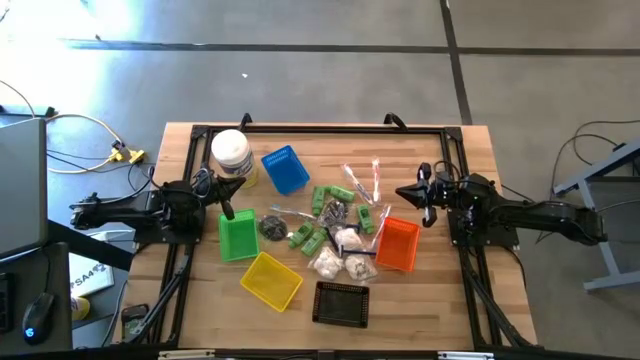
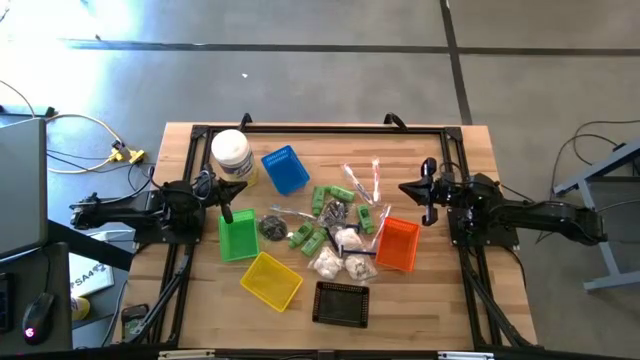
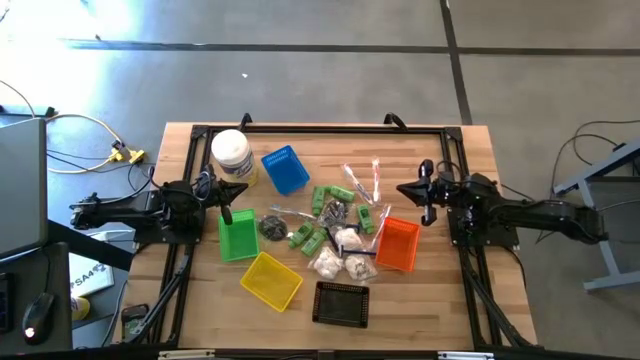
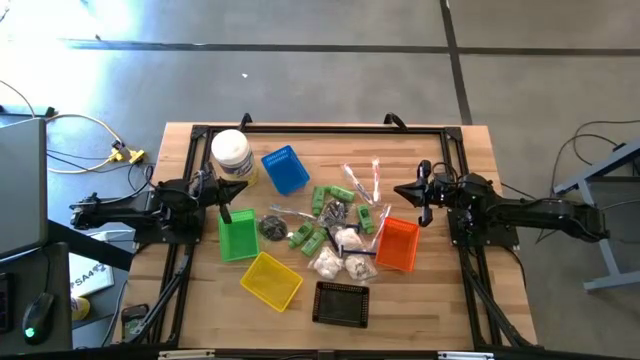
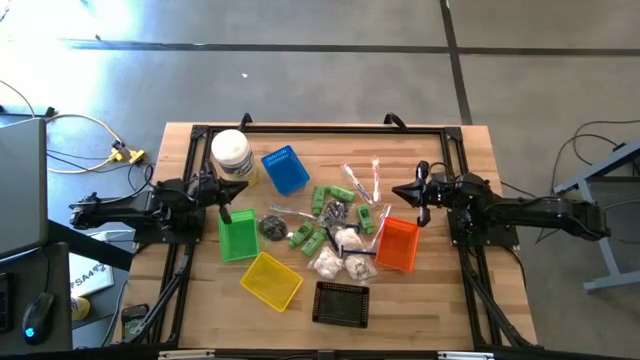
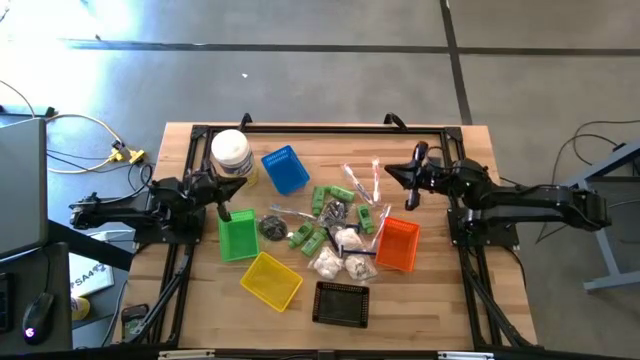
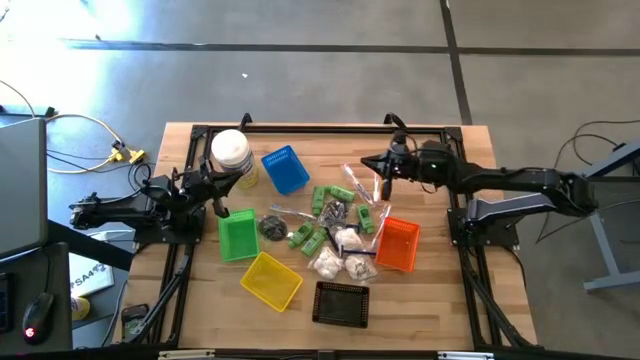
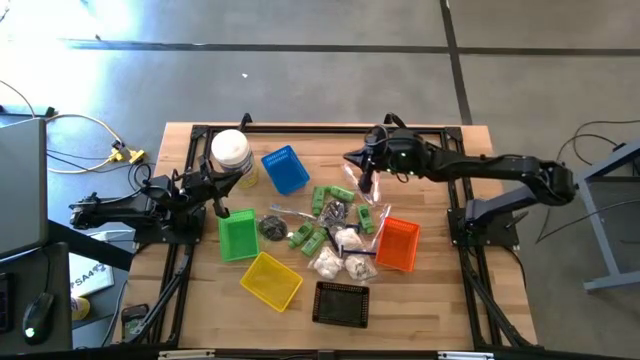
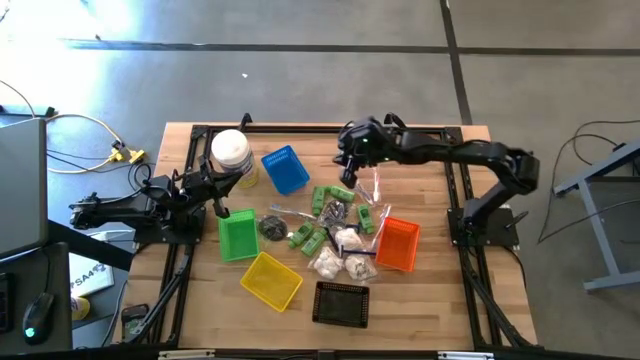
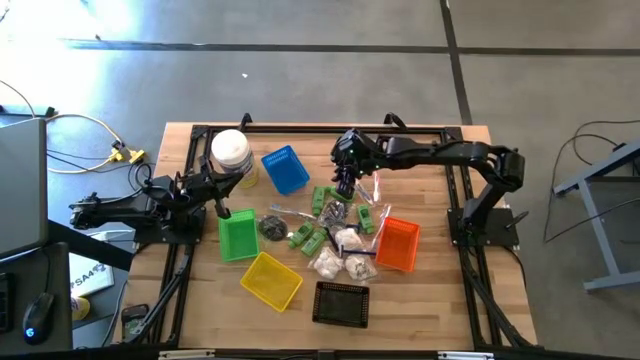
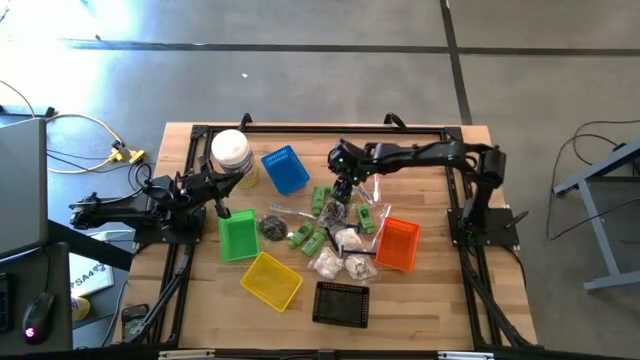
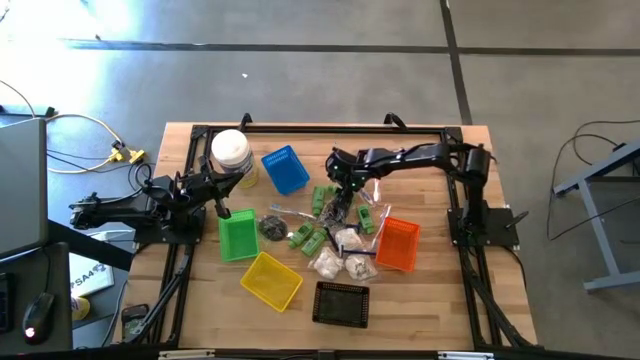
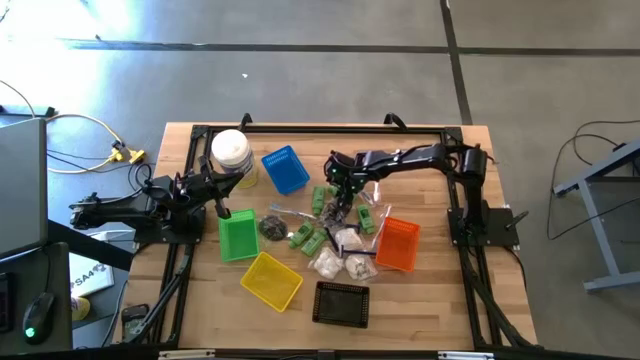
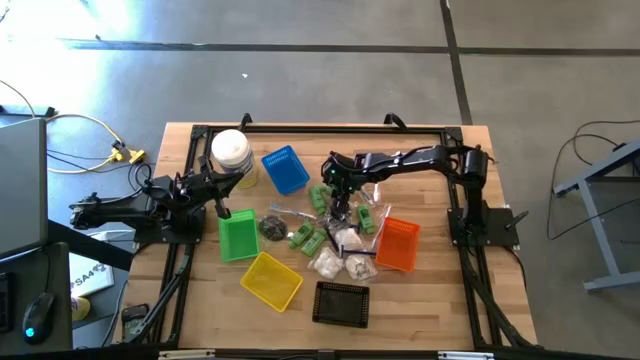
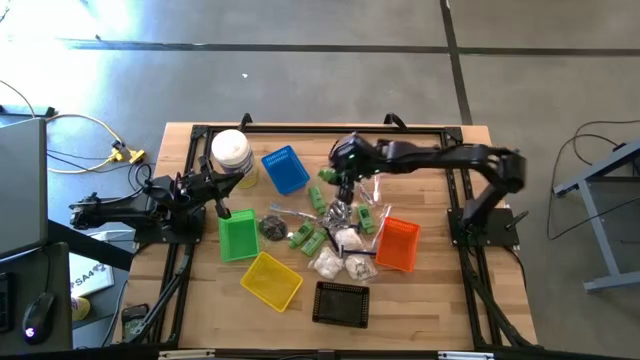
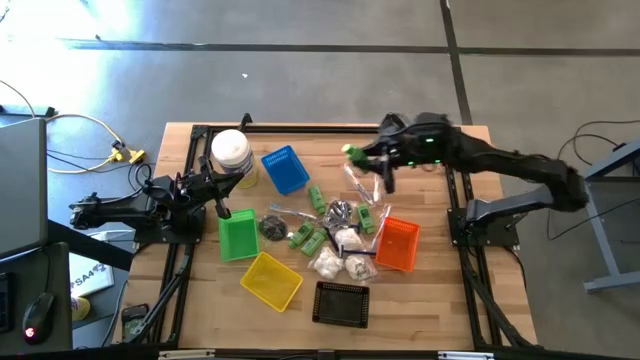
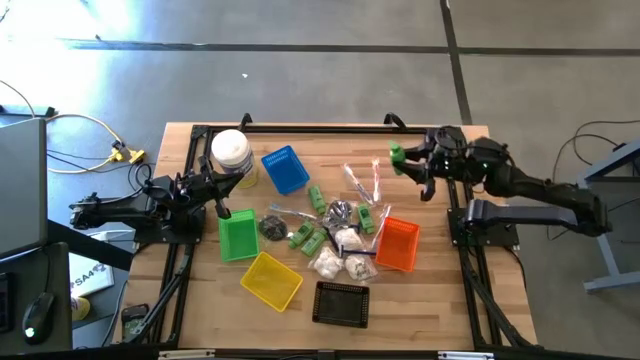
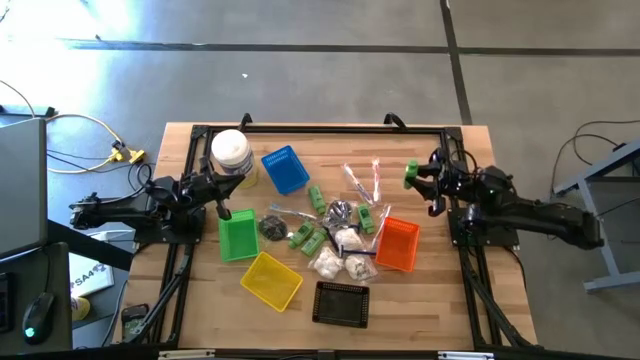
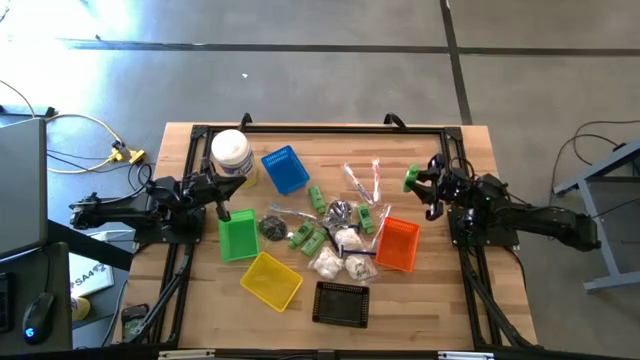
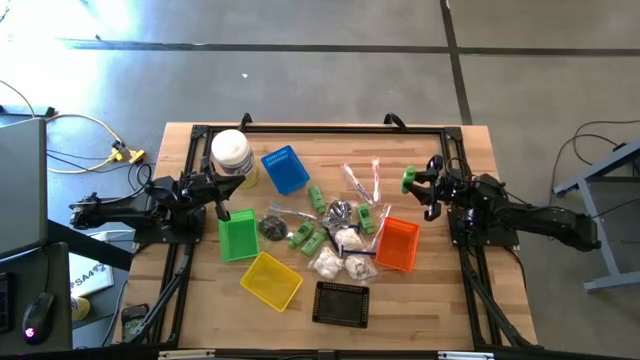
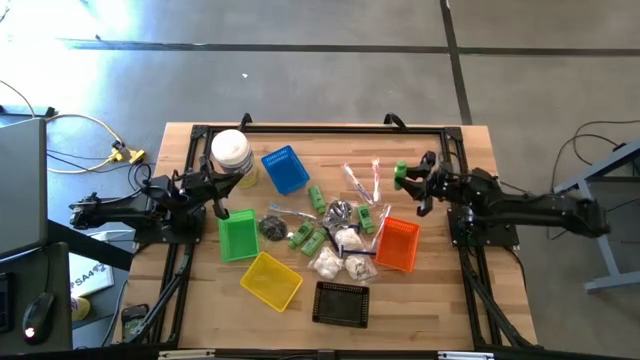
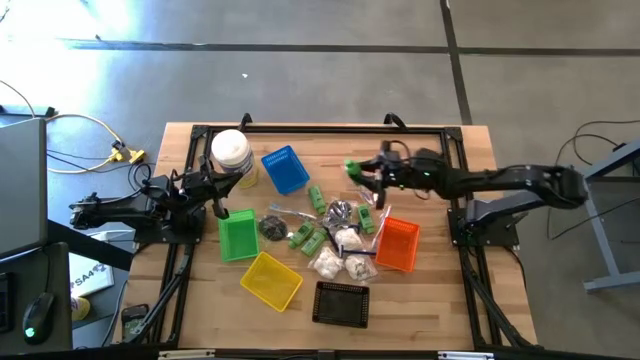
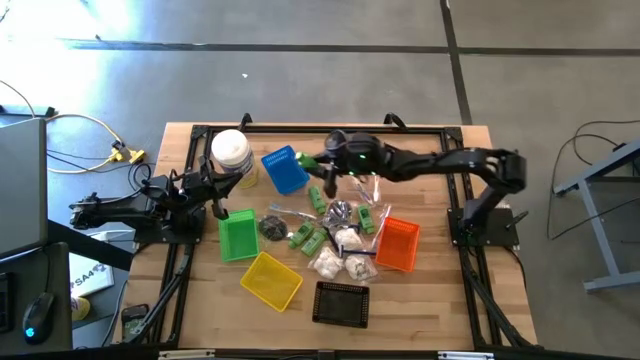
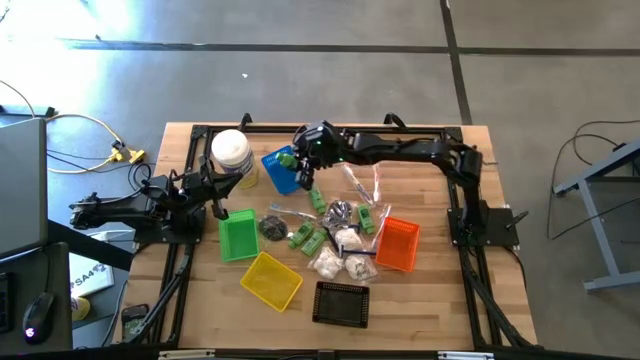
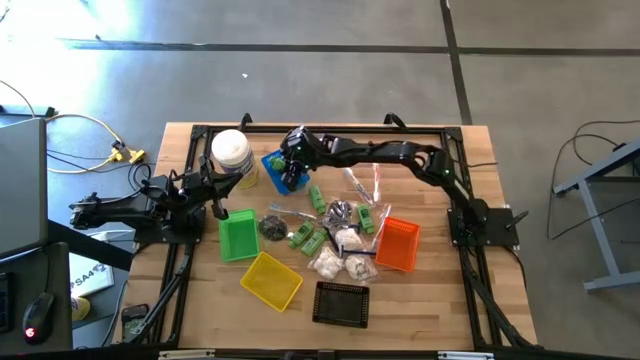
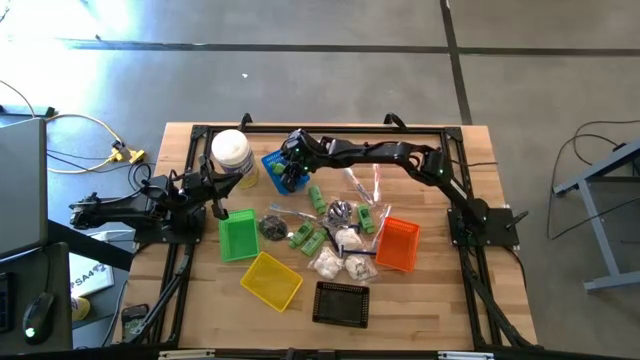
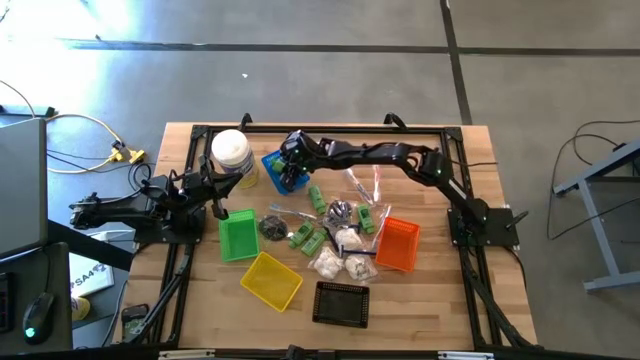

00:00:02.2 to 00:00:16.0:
Task: Pick & Place Travel size toiletries
Put the green shampoo into the blue bin

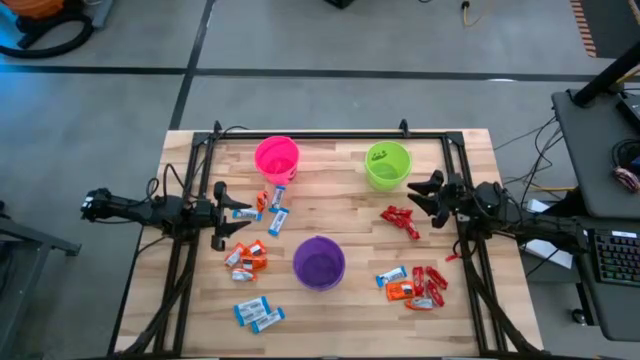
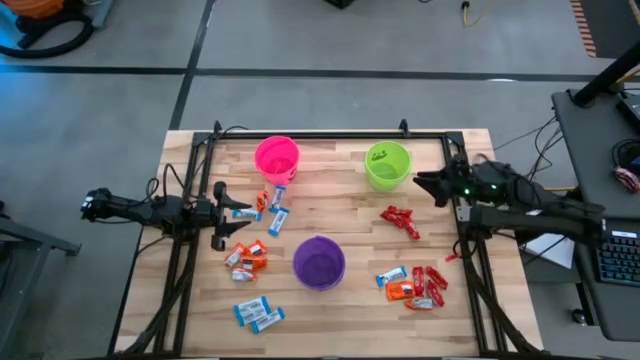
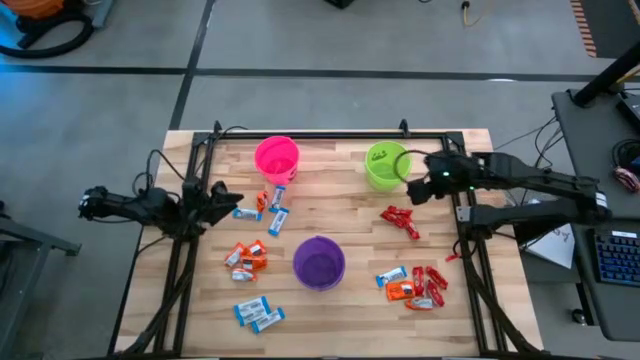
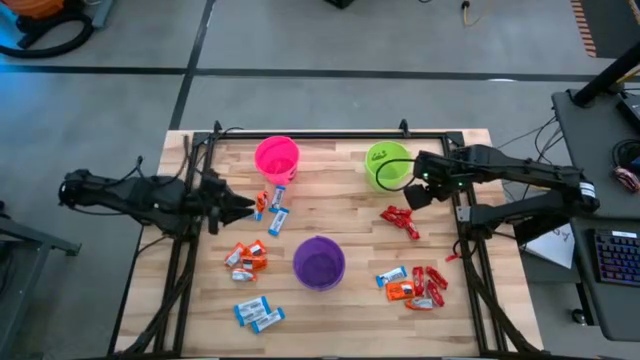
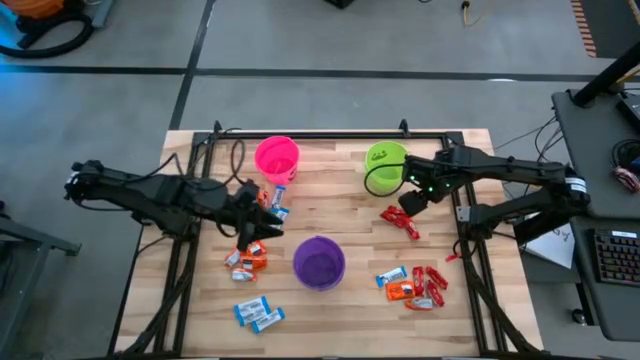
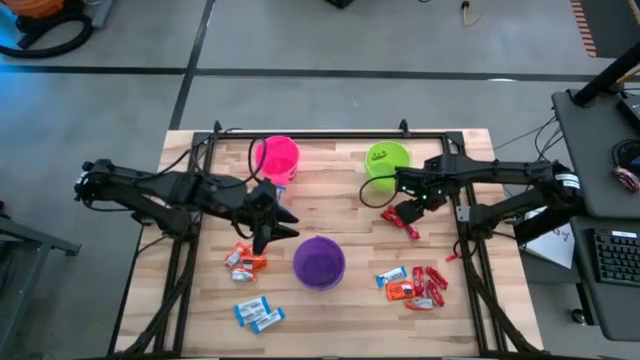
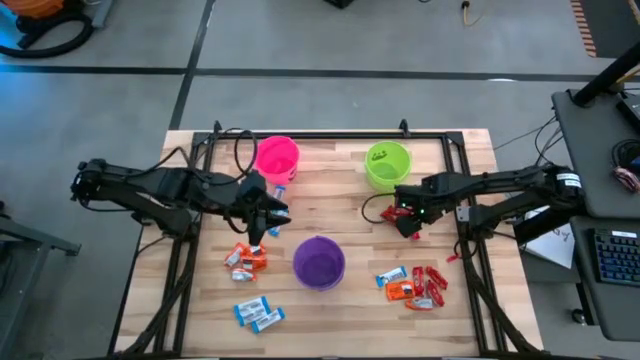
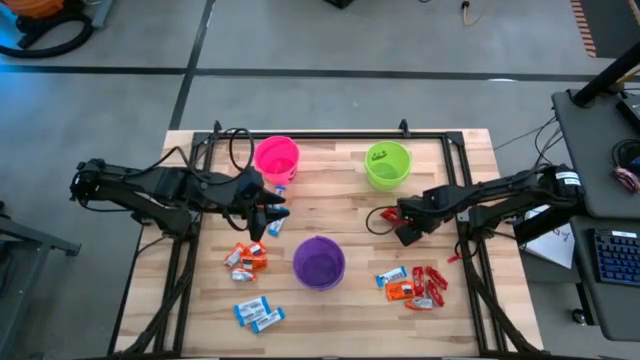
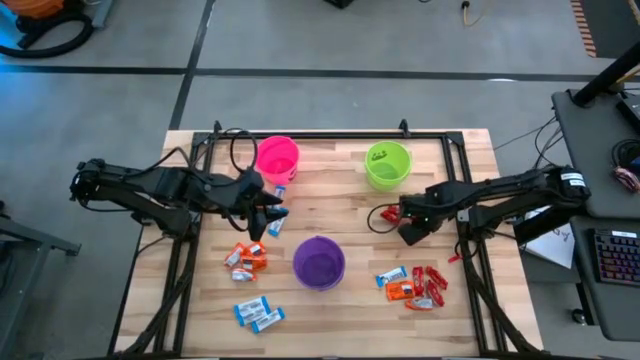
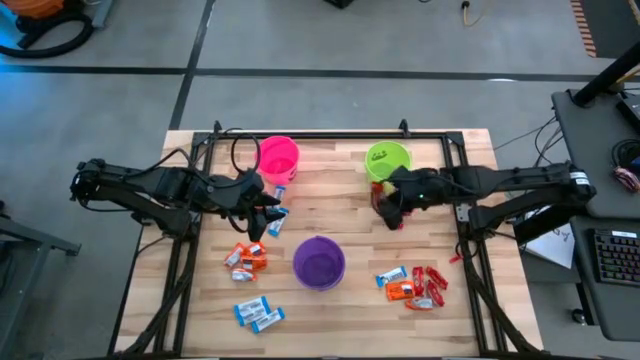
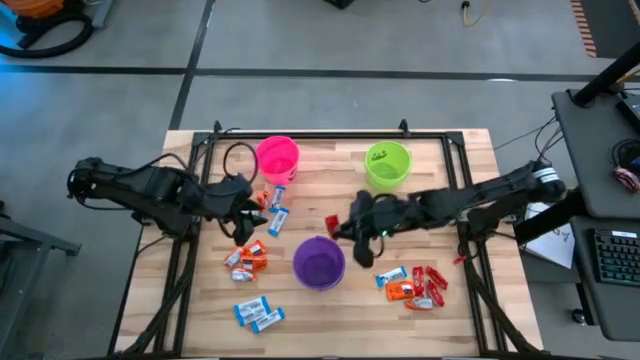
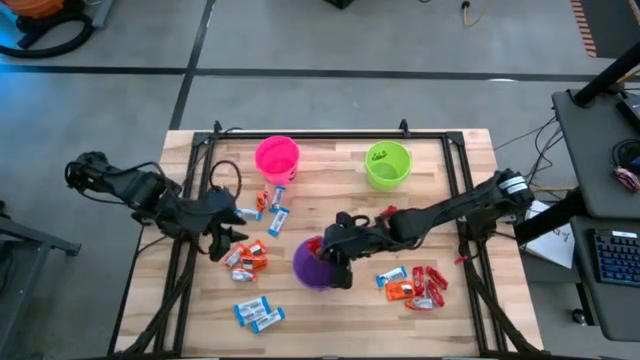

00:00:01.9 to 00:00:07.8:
Task: Sort candy
Put the red chocolate into the violet bucket

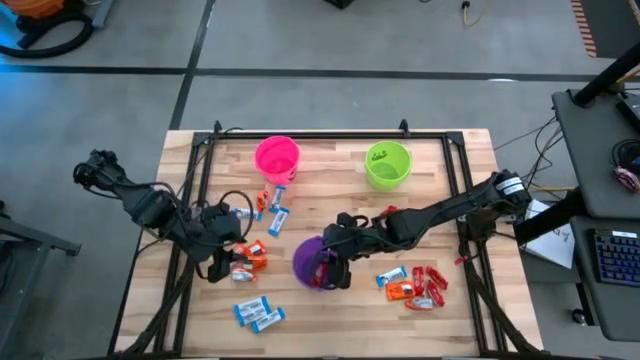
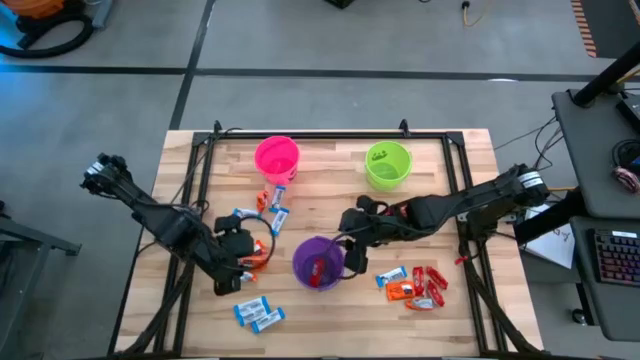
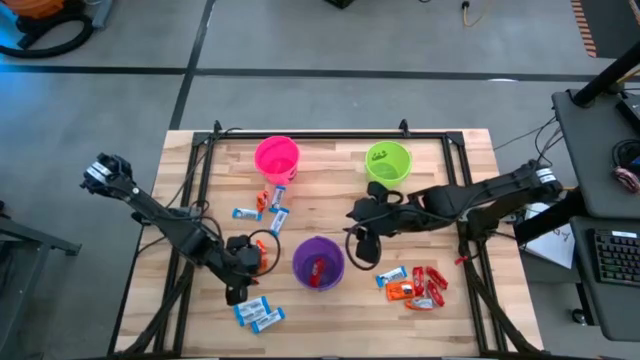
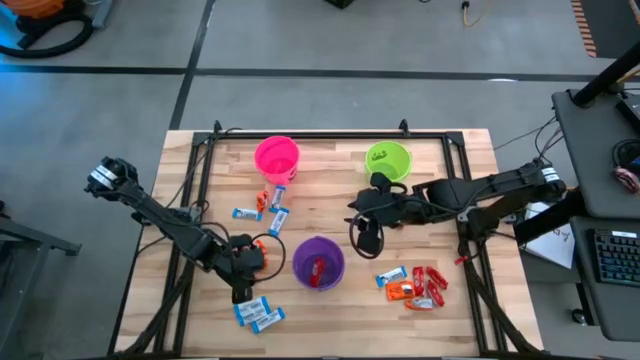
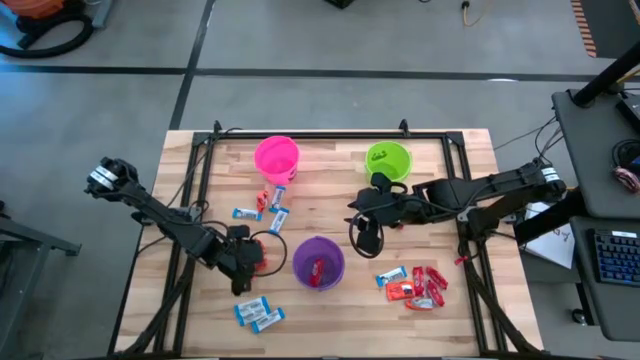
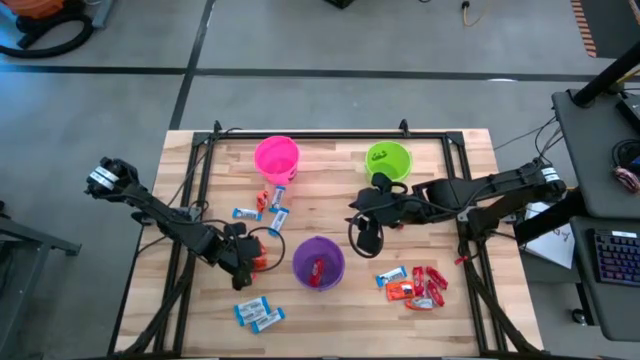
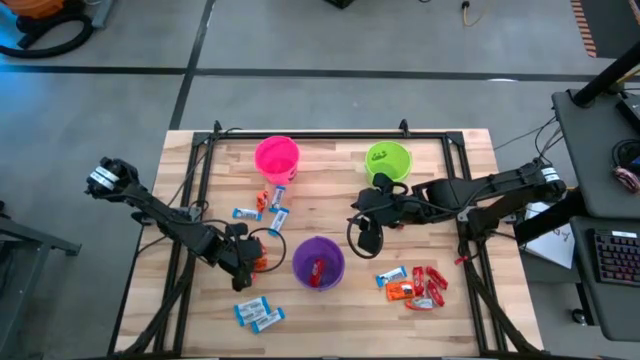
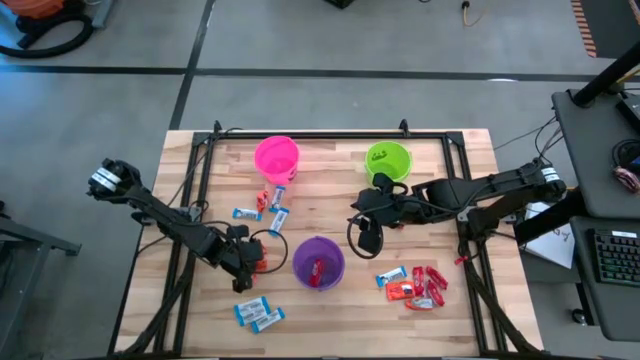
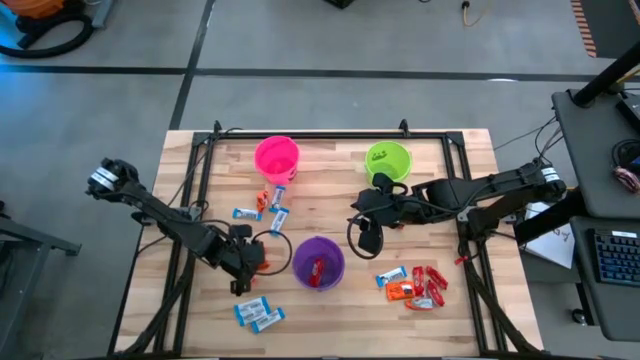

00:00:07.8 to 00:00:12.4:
Put the orange chocolate into the pink bucket
